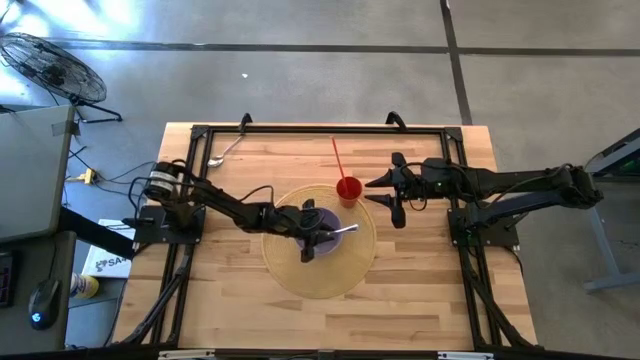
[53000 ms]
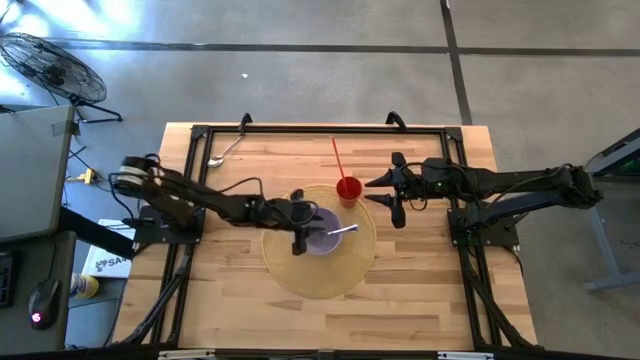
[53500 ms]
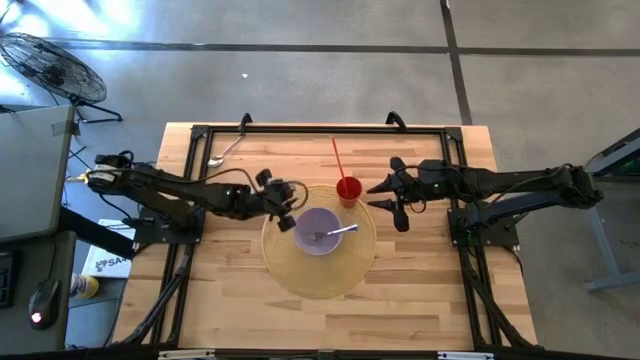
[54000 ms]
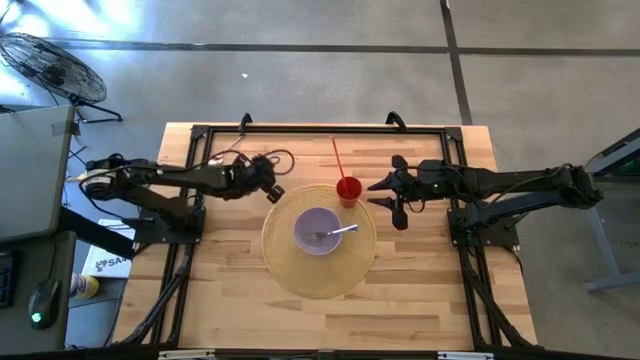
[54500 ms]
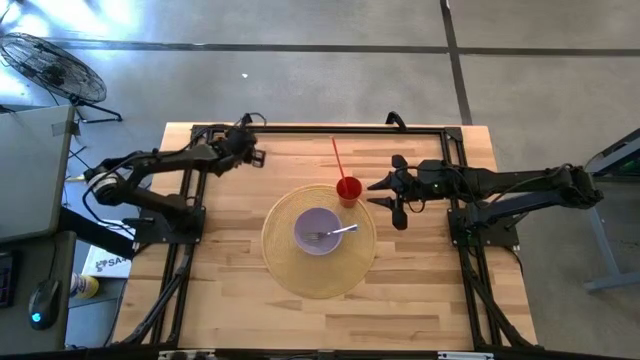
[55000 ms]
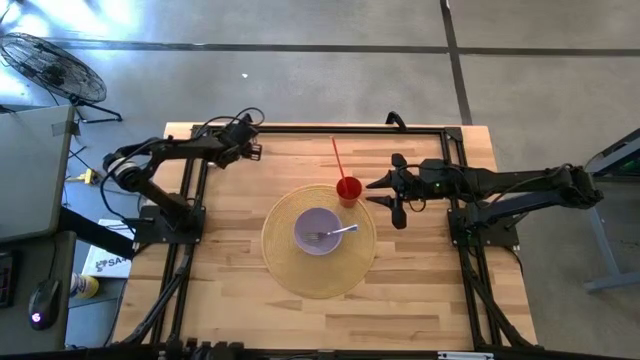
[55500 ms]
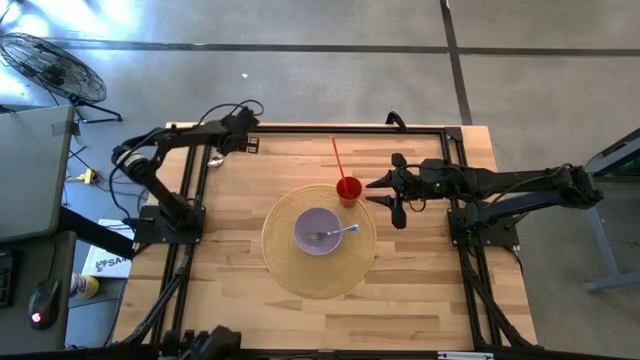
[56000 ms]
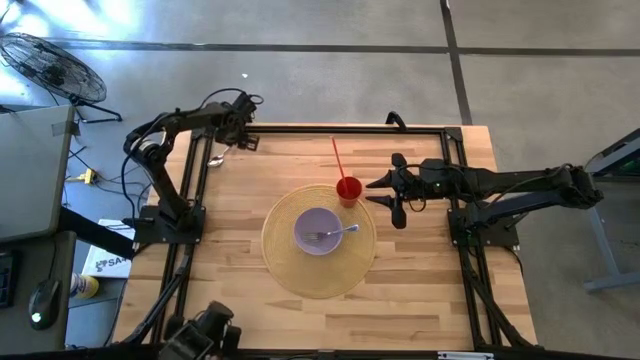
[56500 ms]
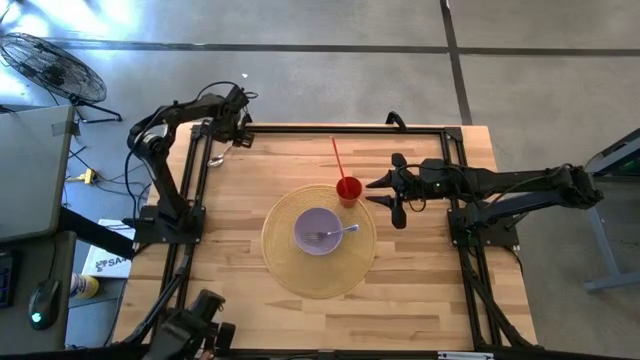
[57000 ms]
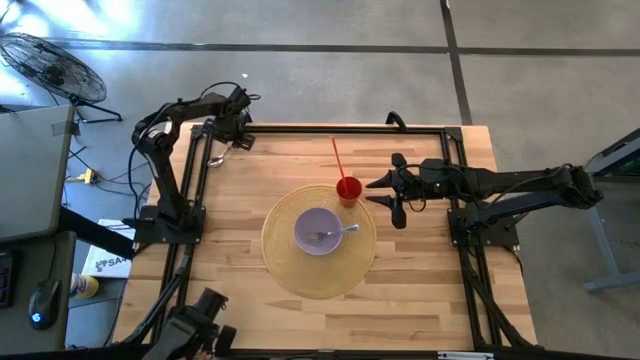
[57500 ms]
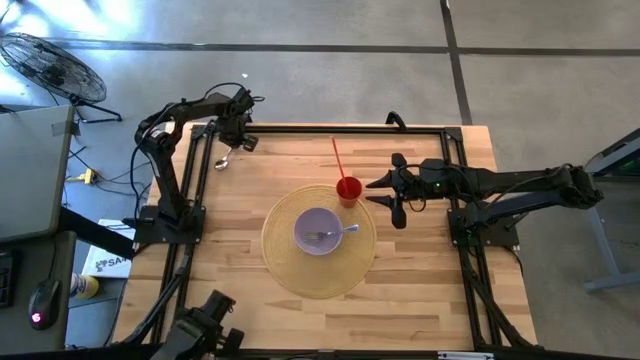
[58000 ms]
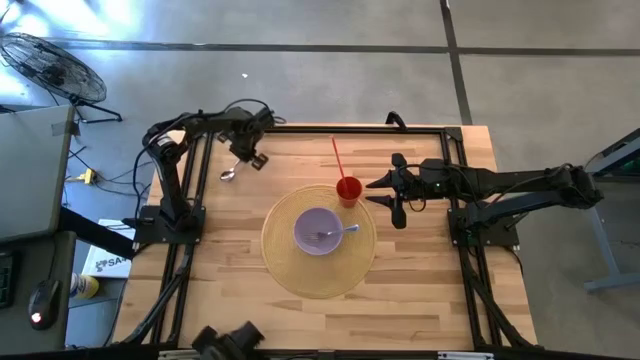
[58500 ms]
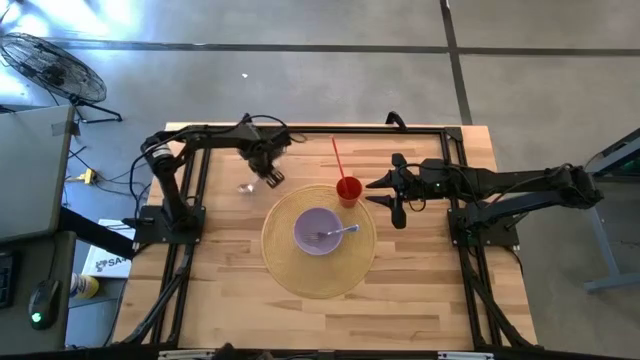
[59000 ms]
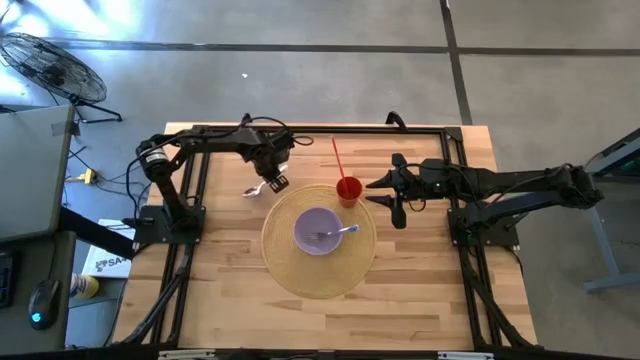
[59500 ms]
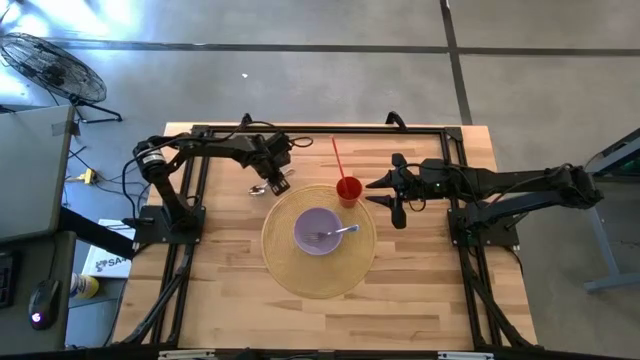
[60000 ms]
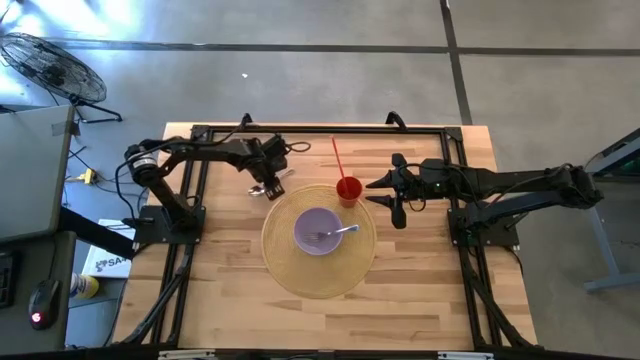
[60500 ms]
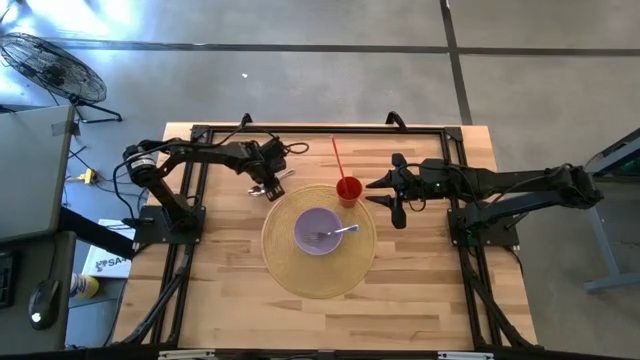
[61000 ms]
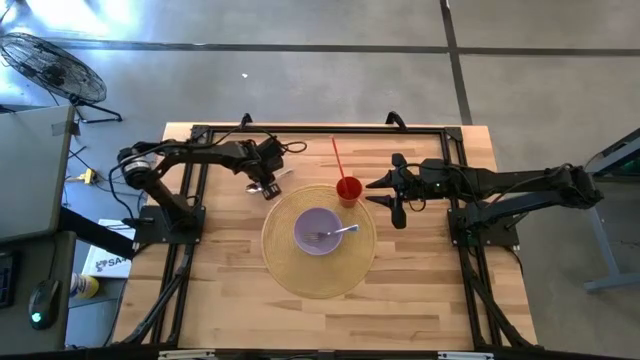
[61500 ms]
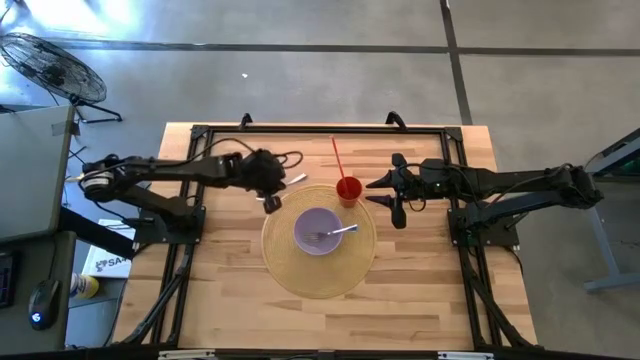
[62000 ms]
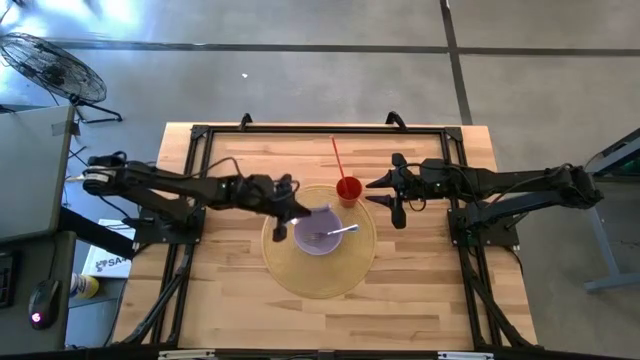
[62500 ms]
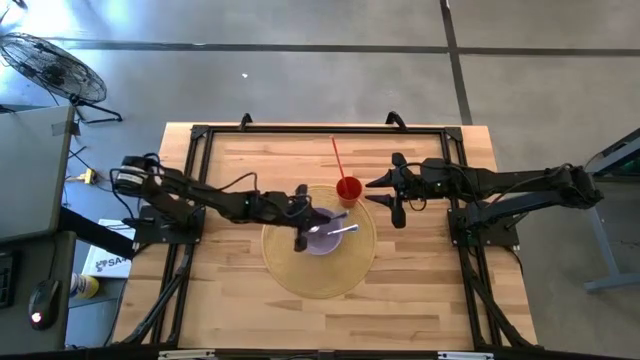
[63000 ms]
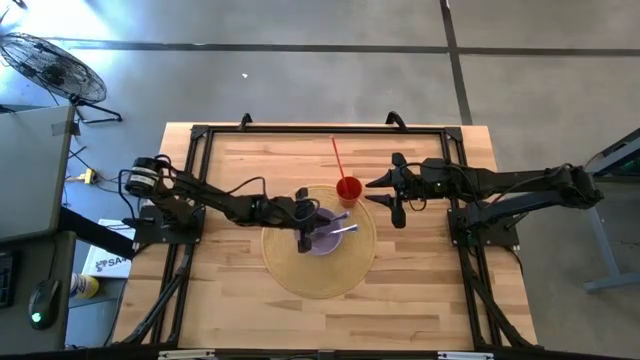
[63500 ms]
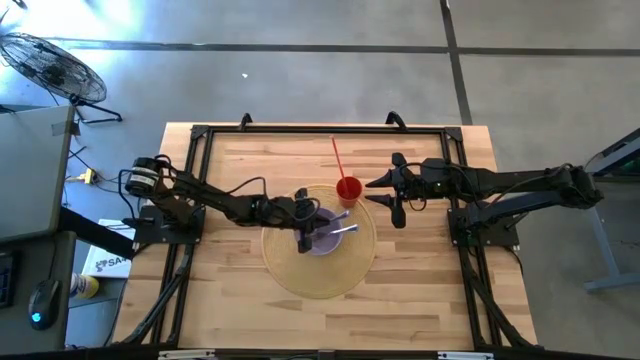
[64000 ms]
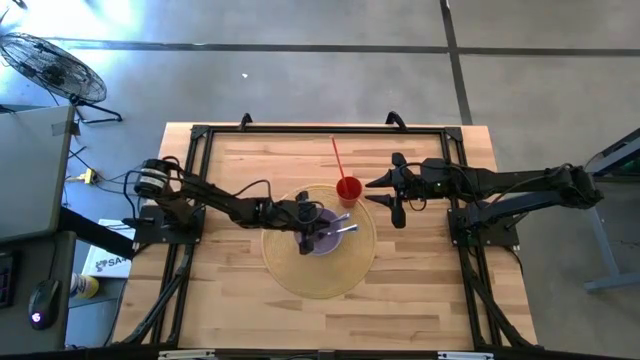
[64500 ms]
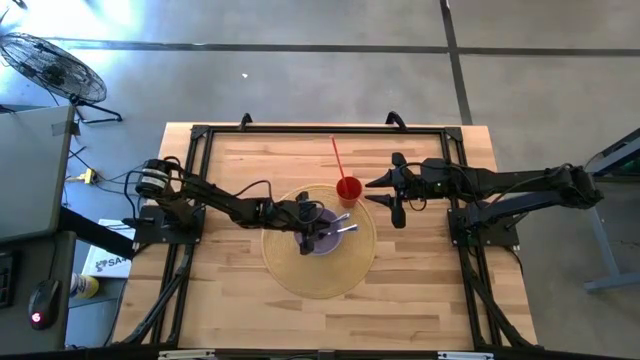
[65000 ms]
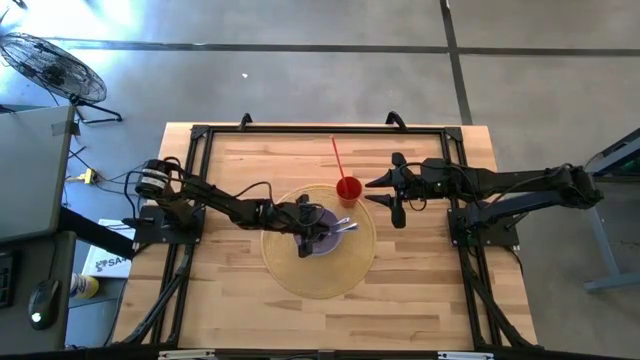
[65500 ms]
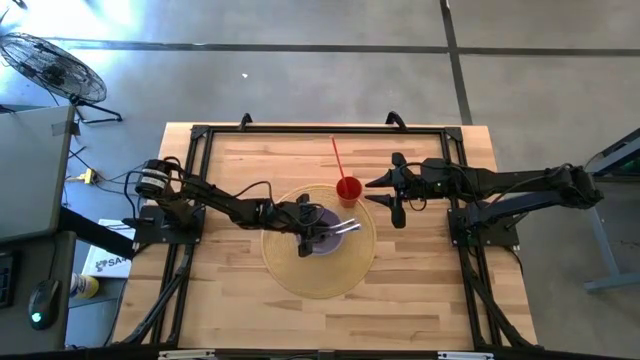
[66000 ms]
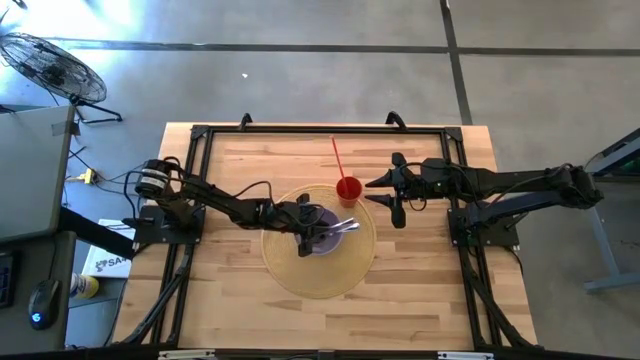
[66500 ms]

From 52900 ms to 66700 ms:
Task: Pick & Place Utensil
Put the silver spoon into the violet bowl

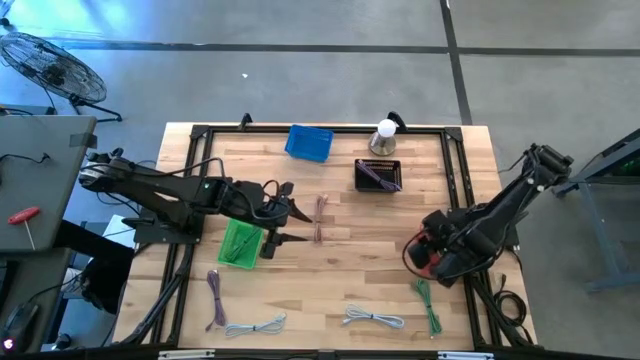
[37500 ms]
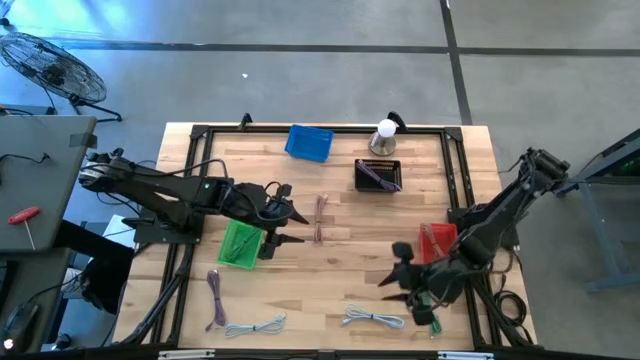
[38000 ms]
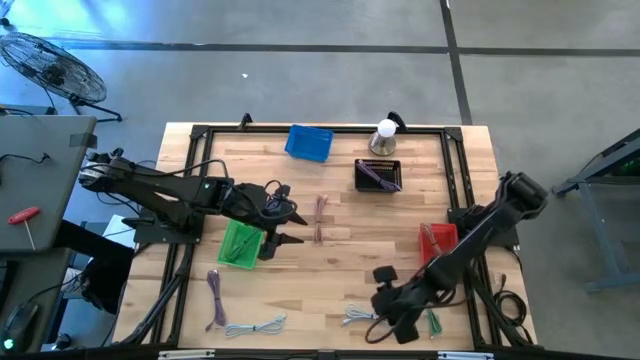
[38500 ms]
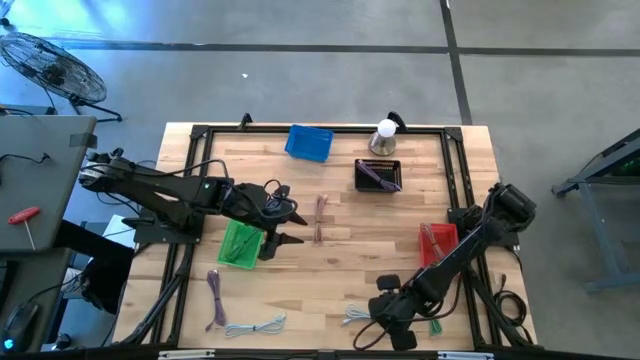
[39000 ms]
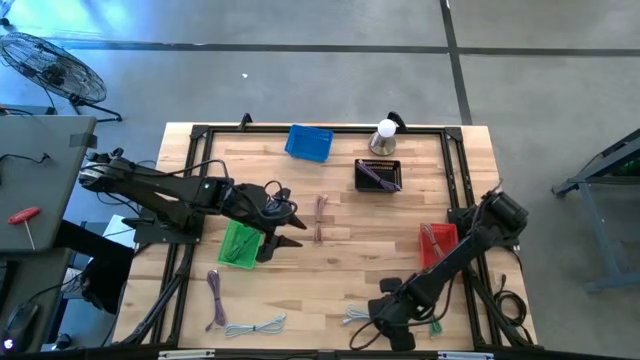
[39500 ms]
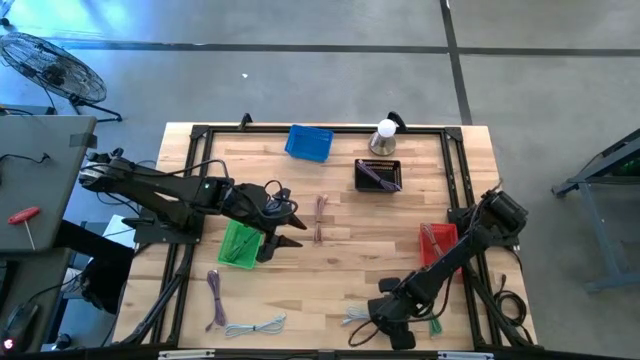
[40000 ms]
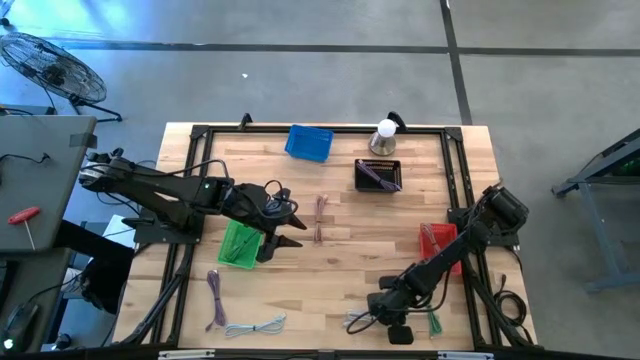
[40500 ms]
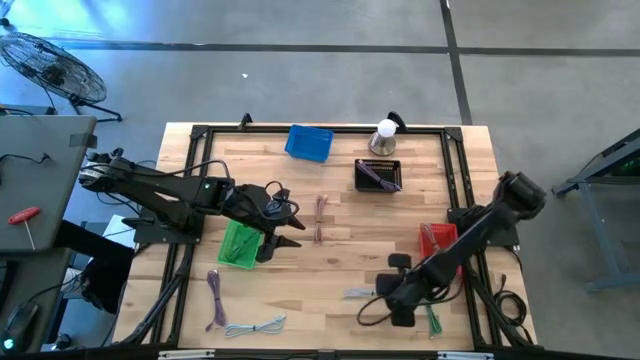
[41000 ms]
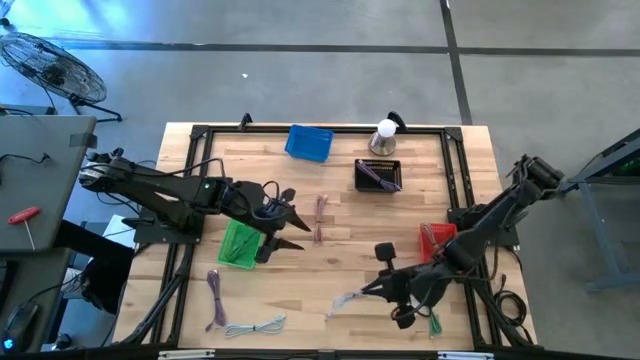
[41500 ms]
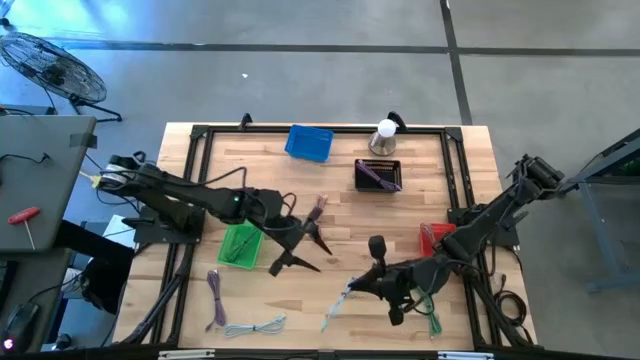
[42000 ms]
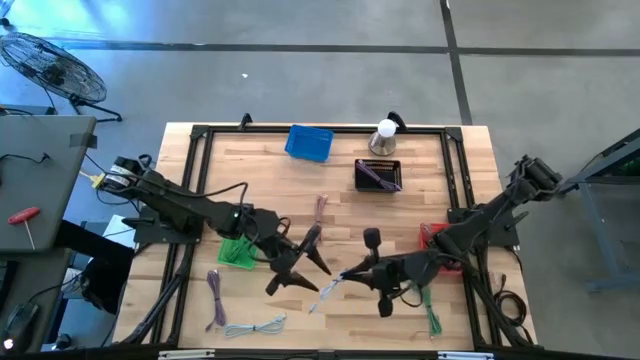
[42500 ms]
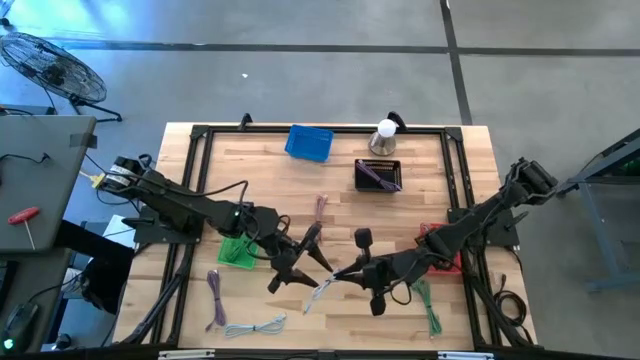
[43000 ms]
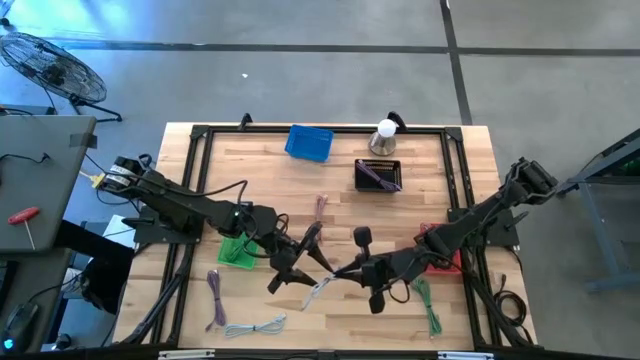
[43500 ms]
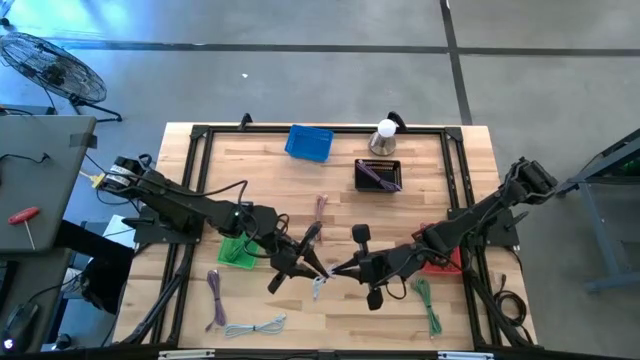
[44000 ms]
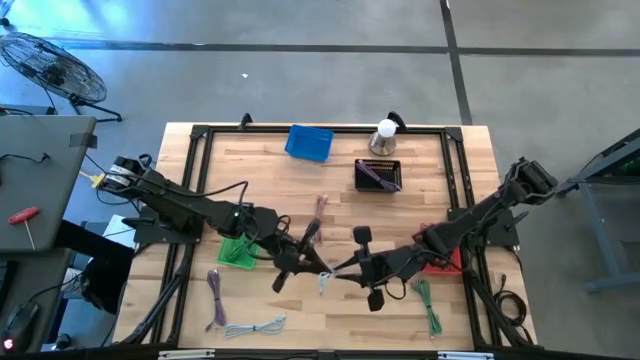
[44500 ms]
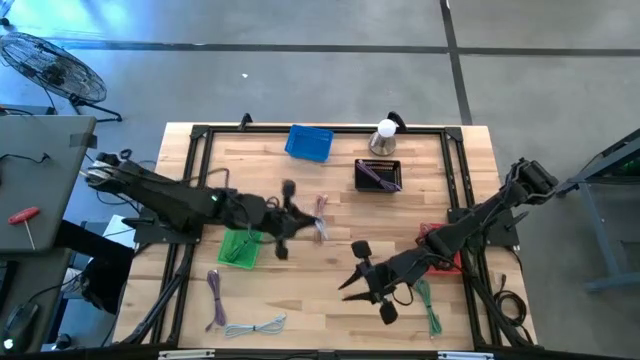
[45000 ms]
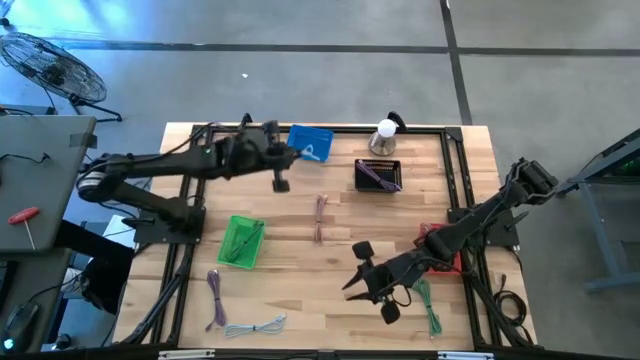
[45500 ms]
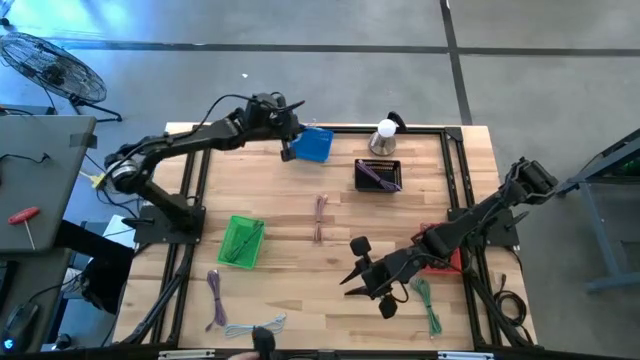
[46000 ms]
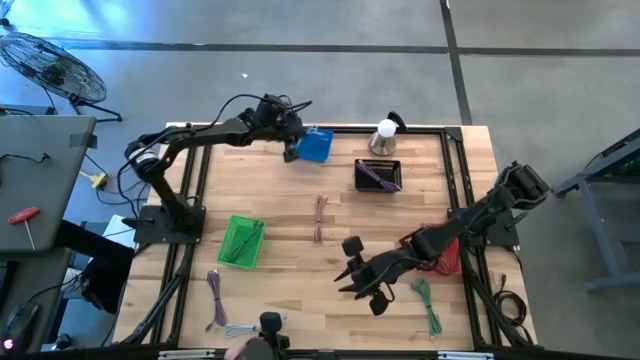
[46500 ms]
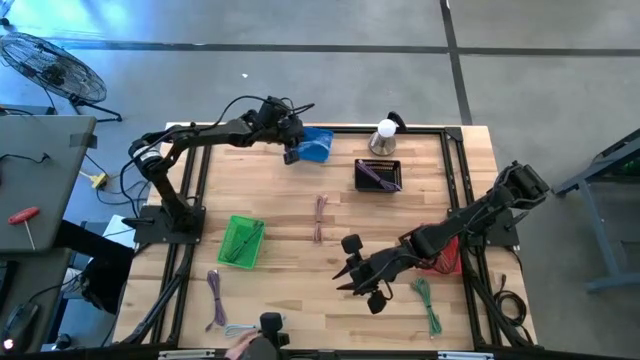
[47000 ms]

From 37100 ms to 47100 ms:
Task: Pick & Place USB Port
Put the right light blue charger cable into the blue bin
